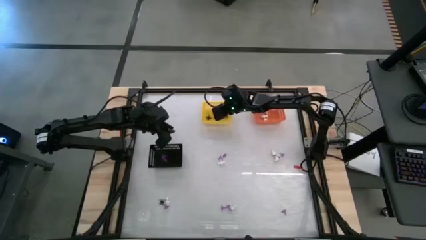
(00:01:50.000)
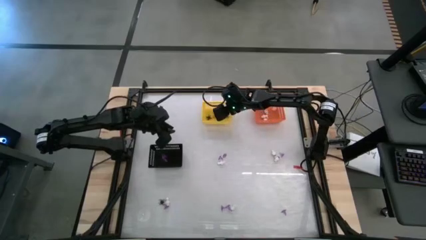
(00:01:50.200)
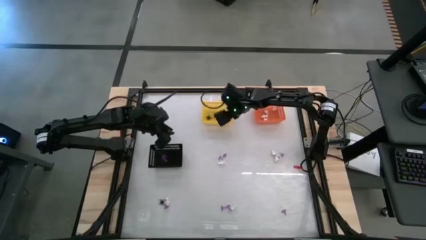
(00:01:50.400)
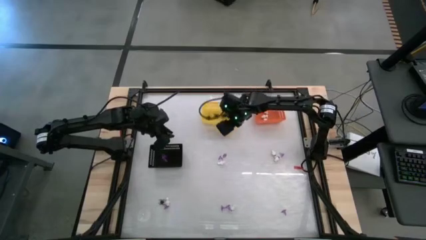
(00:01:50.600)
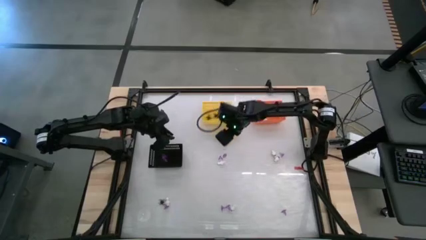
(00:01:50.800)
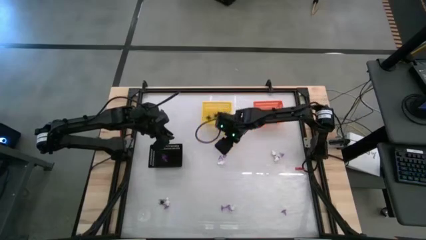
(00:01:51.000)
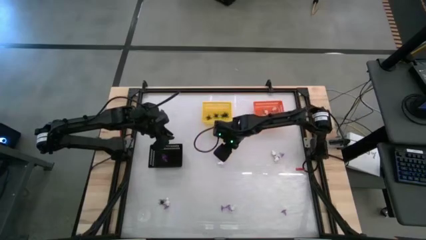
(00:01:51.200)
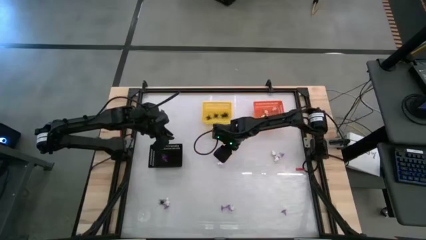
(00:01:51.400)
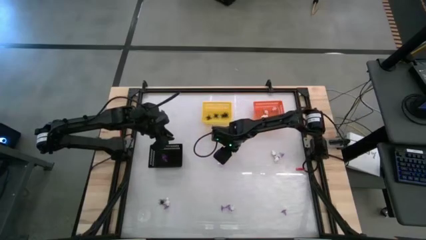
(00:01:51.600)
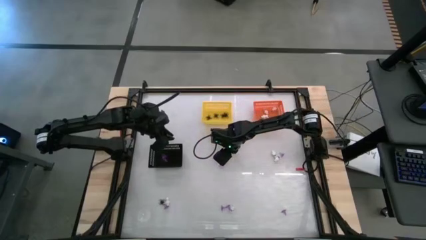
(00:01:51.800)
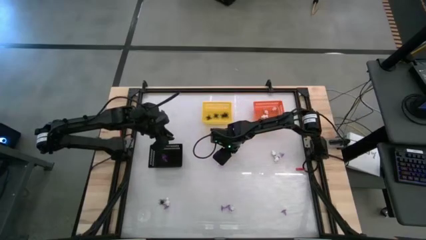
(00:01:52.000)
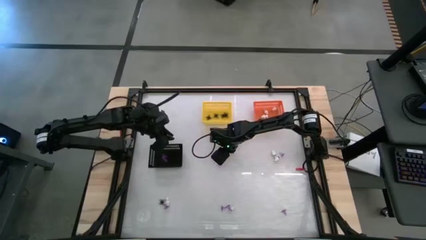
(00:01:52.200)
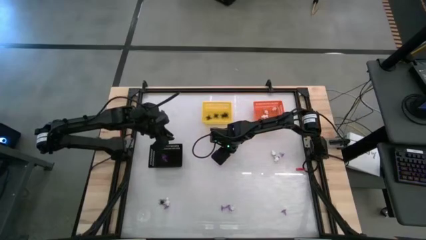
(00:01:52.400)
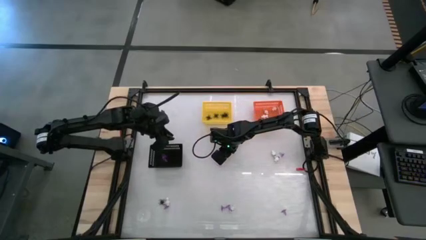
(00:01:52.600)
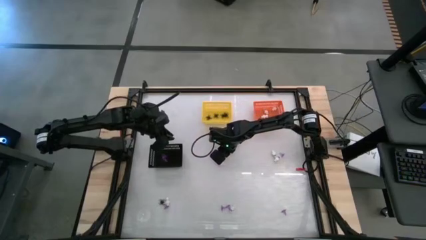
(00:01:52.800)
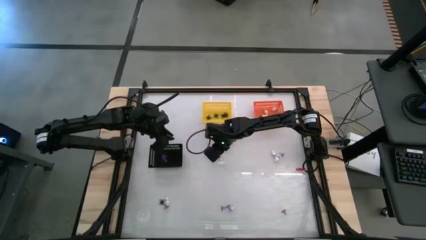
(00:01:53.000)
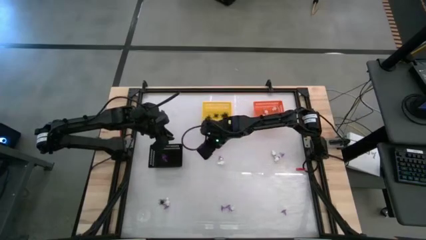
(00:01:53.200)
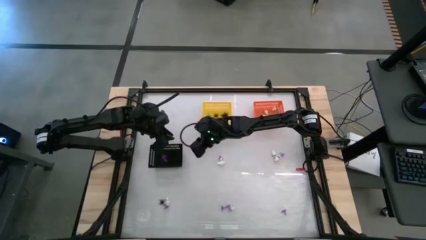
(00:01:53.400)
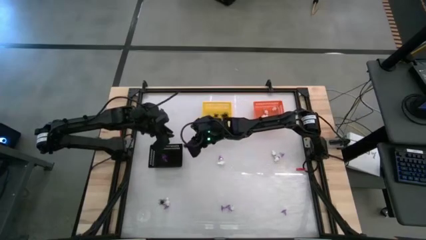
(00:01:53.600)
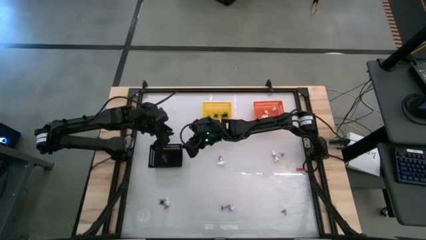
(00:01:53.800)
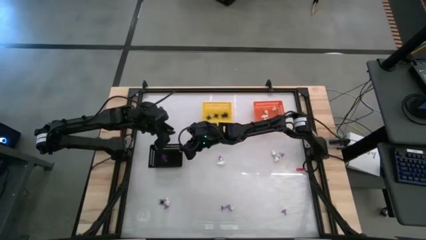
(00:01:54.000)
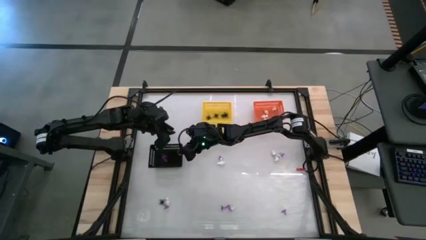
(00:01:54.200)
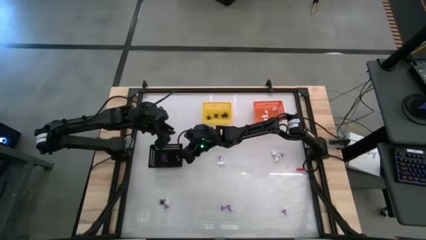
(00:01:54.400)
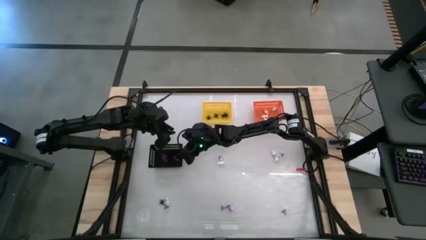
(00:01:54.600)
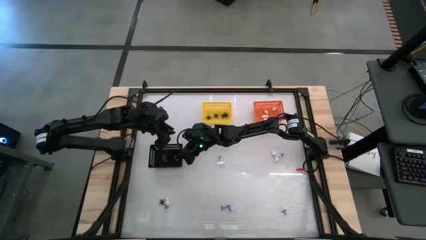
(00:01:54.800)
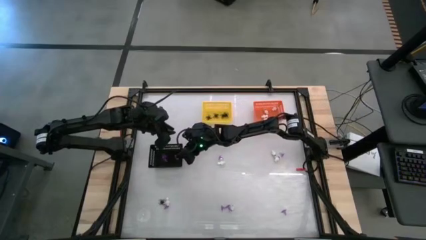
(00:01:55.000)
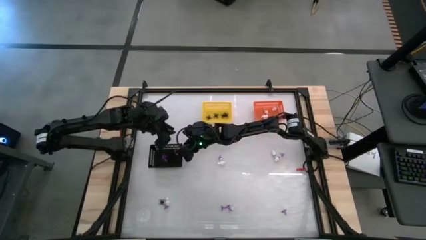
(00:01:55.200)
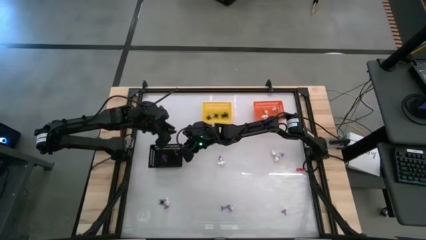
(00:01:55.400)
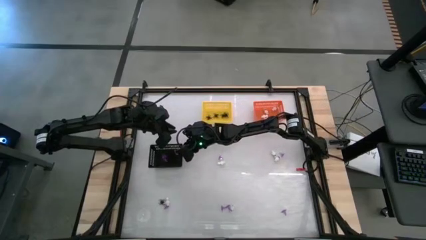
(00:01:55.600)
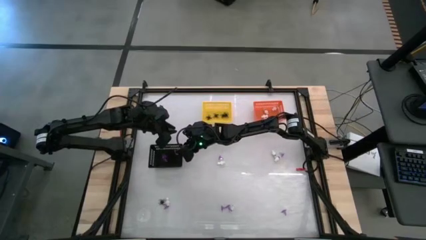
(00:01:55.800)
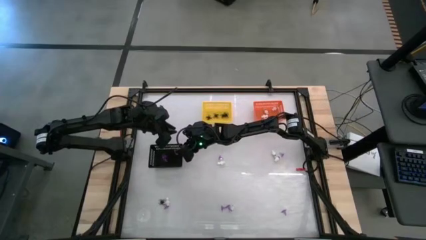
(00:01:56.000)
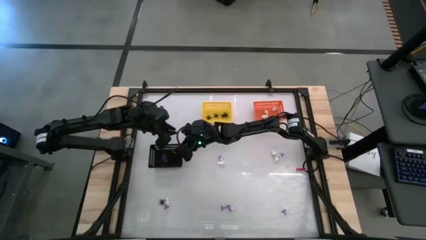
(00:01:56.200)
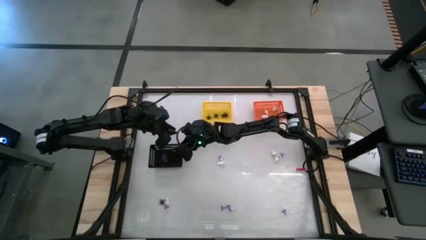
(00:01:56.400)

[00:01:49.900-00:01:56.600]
Task: Sort Halloween decoration
Put the purple hat toy into the black basket

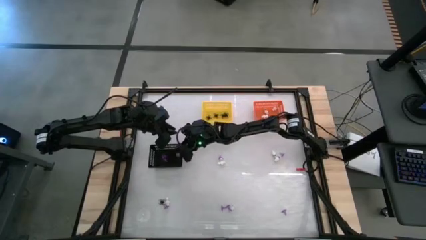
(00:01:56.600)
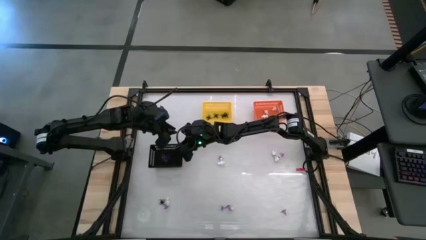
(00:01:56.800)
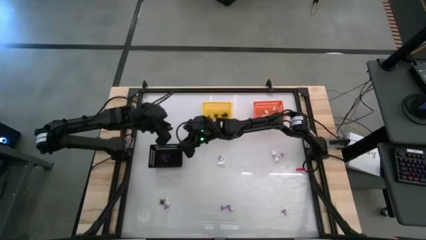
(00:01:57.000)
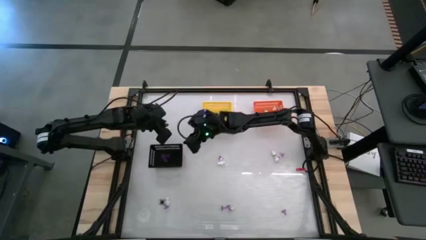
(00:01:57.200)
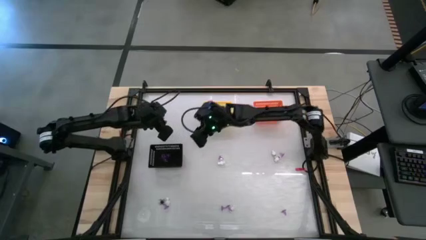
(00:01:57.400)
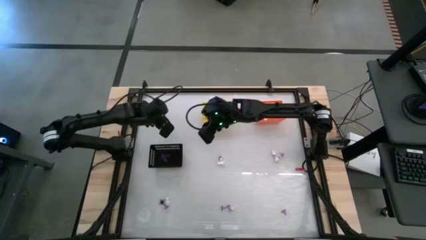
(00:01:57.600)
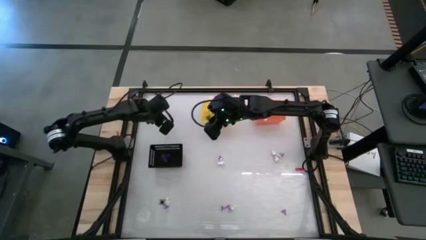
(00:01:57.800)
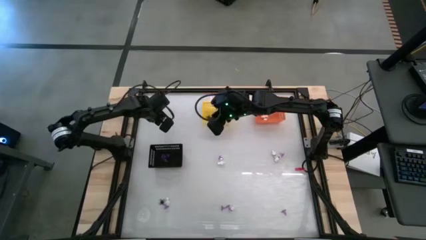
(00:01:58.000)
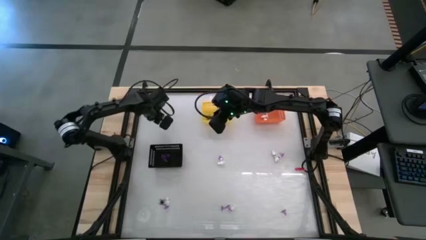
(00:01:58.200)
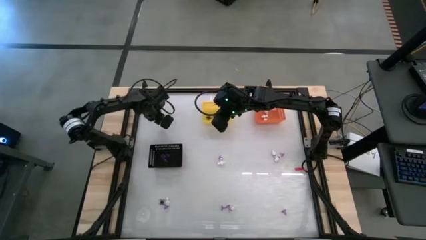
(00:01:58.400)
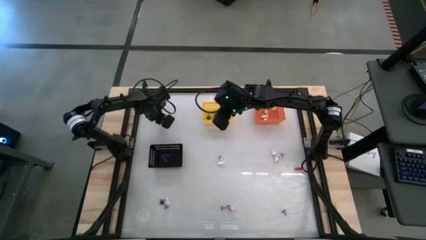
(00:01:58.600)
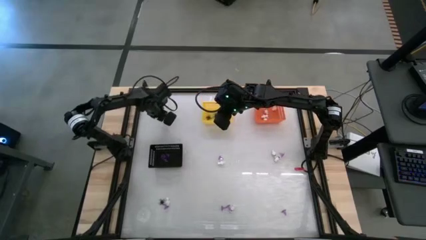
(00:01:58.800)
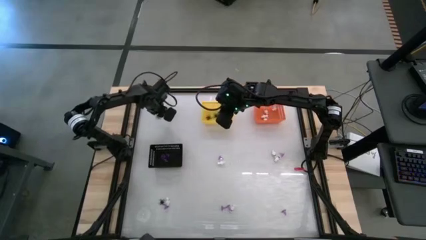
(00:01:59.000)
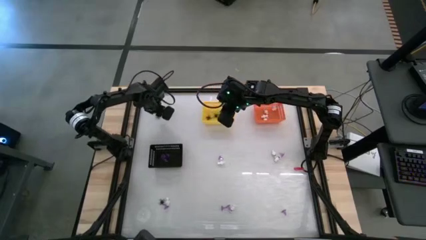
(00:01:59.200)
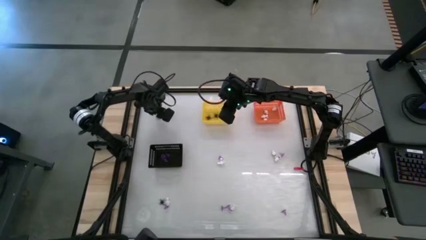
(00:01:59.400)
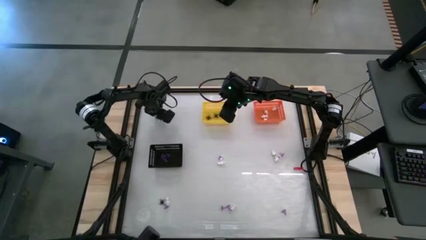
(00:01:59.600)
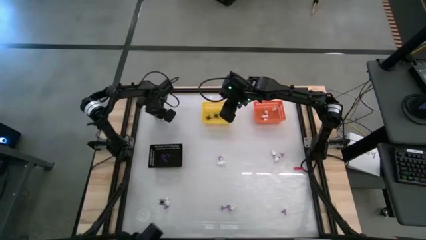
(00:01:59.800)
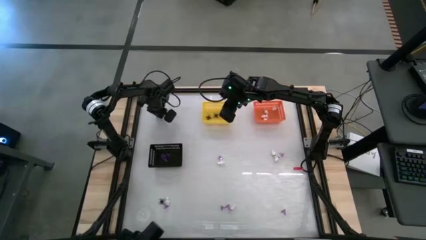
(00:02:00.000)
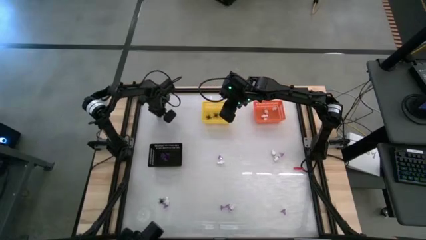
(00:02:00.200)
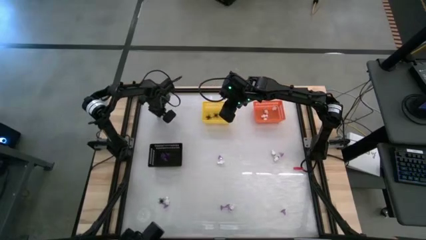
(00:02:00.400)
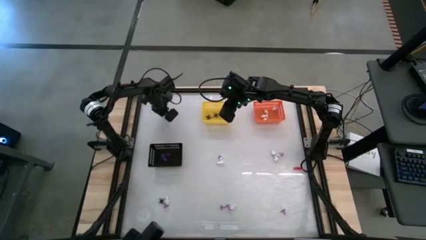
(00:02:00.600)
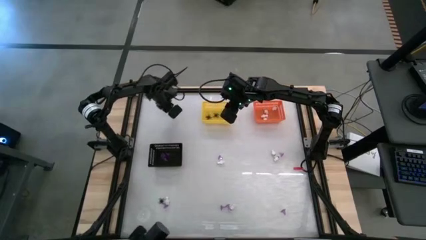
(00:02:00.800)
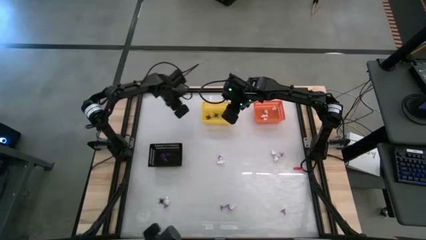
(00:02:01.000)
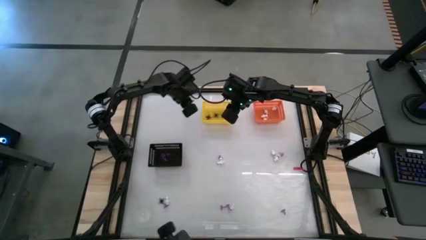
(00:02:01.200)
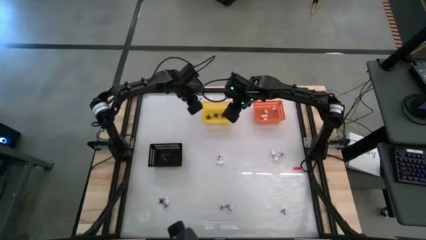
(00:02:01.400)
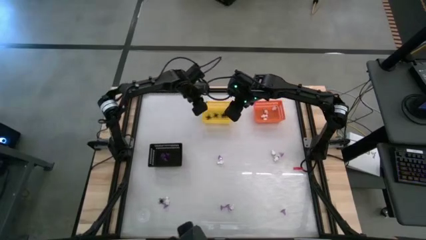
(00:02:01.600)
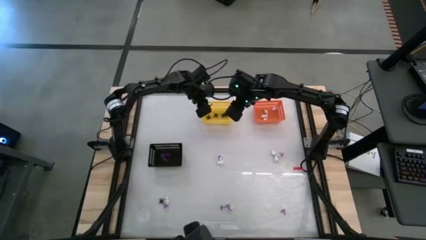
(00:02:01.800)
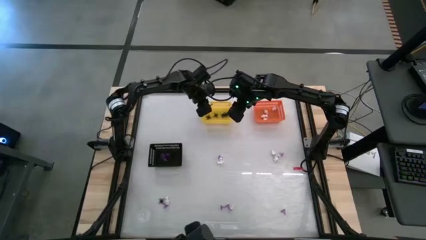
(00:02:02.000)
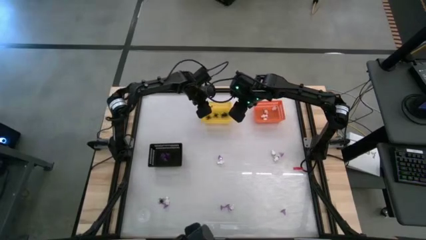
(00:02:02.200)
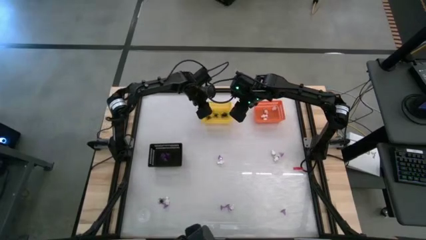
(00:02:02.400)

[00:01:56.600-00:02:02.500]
Put the black spider toy into the yellow basket

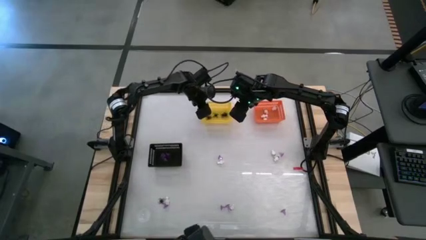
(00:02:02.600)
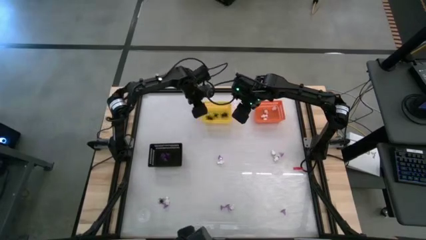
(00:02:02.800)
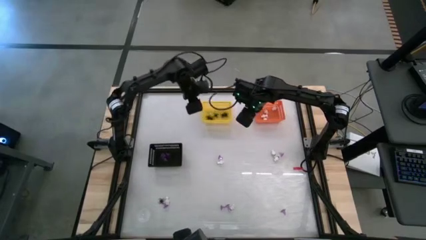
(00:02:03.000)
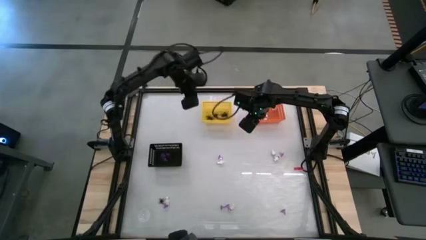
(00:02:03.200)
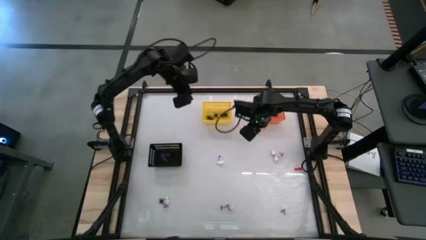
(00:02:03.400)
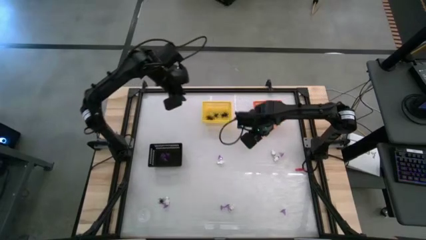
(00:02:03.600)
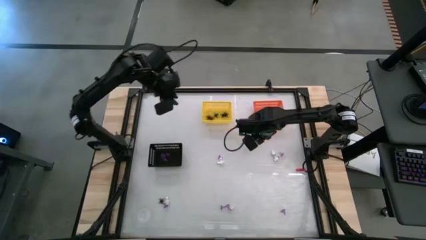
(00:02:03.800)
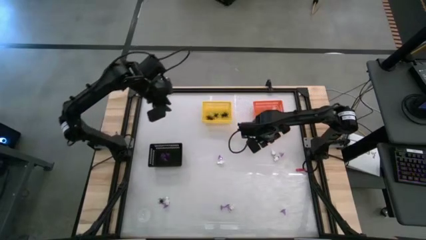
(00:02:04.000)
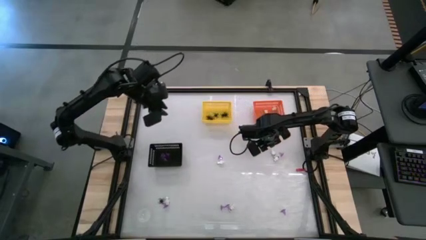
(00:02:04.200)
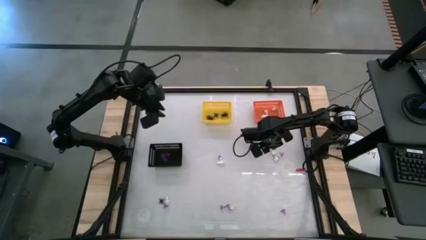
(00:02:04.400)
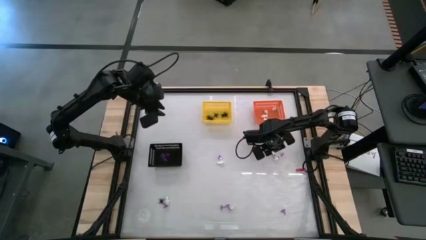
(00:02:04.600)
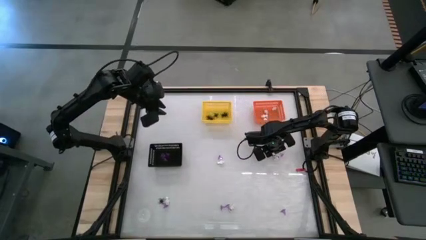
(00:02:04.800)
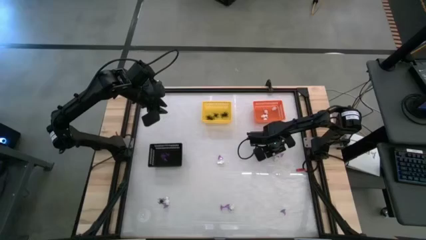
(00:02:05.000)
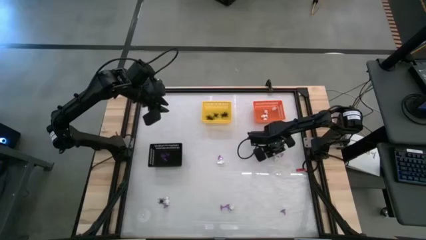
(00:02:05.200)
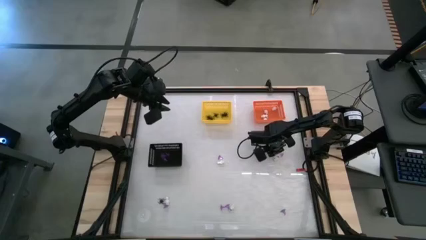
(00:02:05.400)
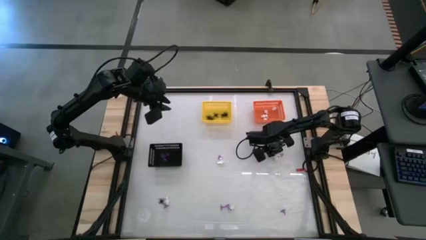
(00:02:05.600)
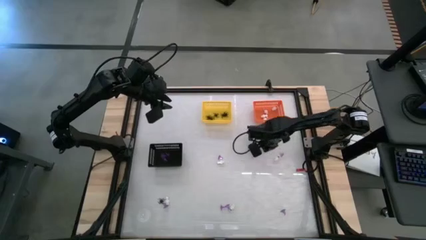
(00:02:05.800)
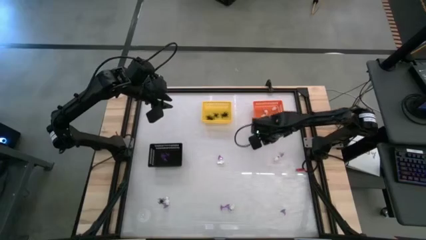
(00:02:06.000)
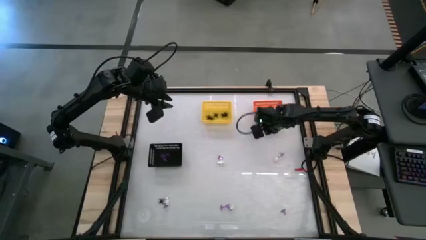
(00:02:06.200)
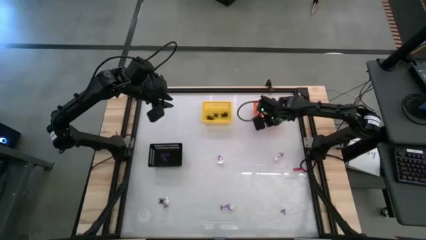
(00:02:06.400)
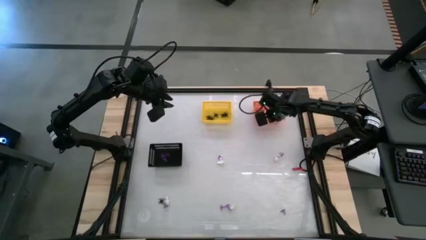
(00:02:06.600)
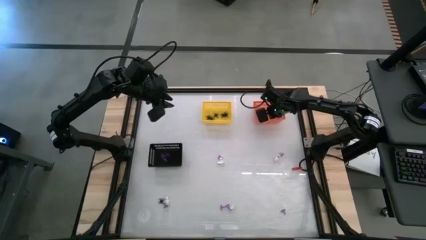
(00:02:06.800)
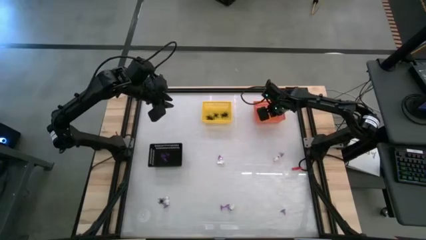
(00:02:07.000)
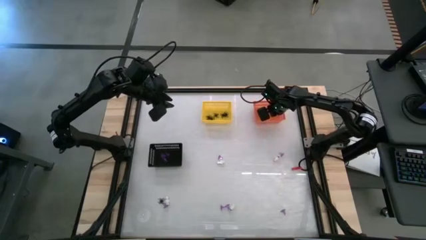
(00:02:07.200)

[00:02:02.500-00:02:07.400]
Put the white skeleton toy into the orange basket
